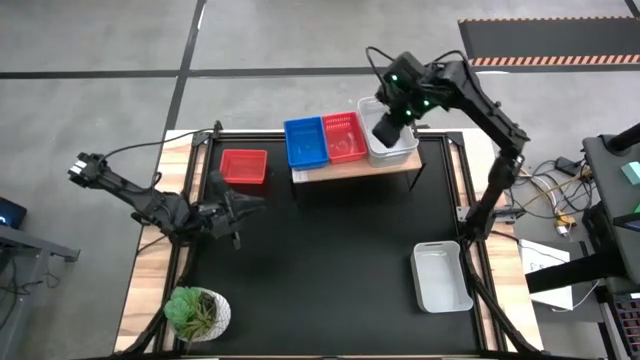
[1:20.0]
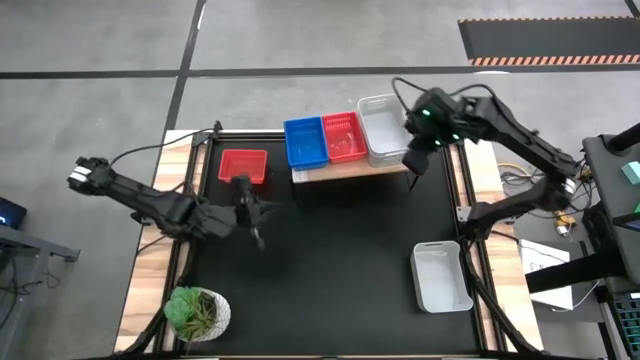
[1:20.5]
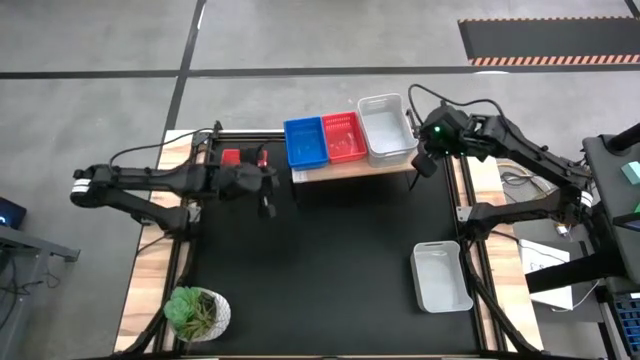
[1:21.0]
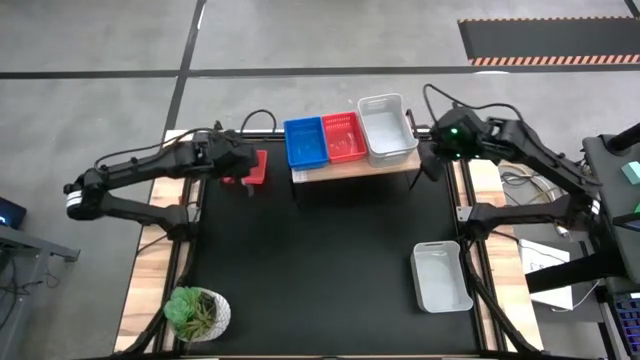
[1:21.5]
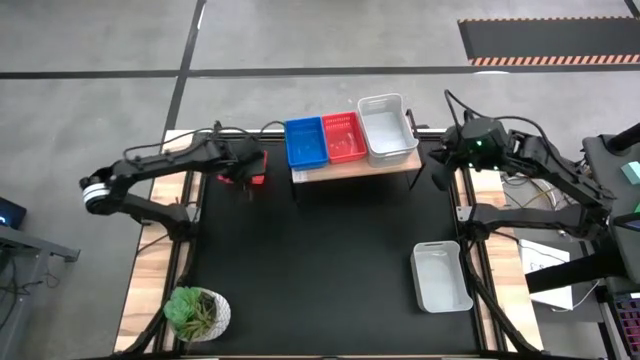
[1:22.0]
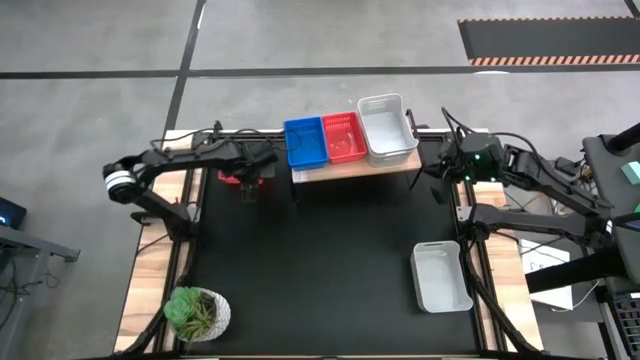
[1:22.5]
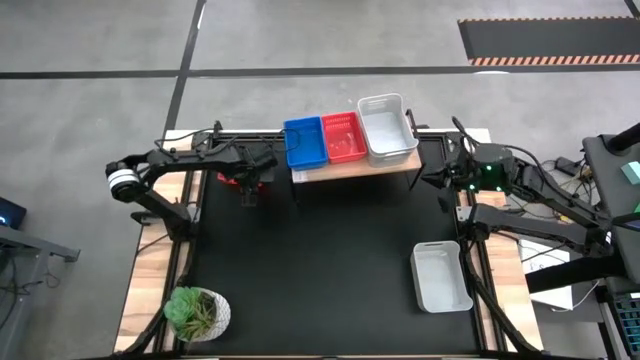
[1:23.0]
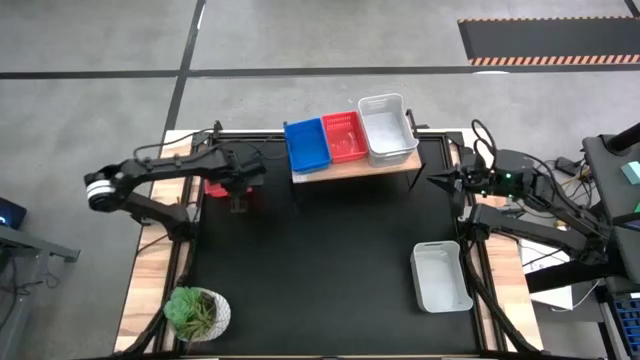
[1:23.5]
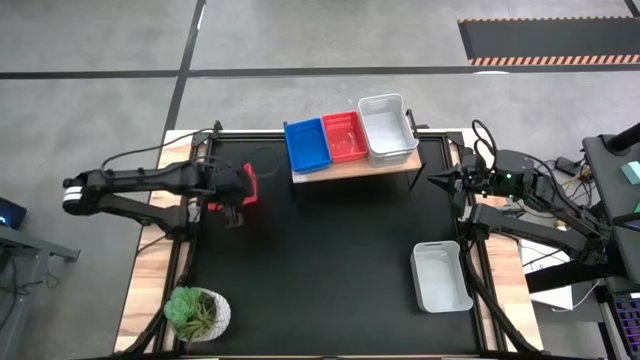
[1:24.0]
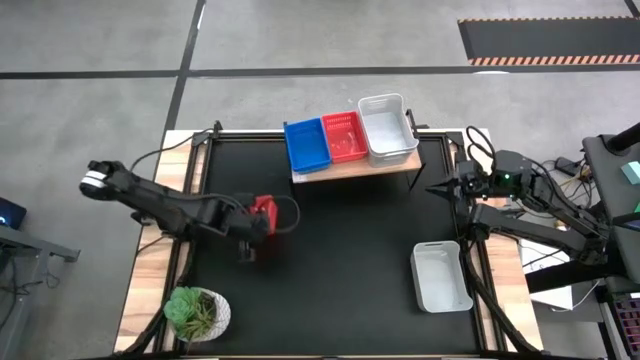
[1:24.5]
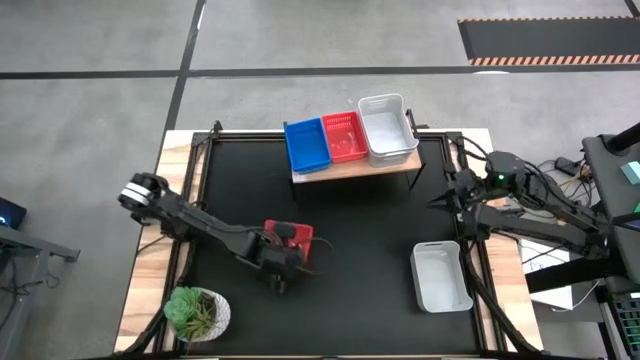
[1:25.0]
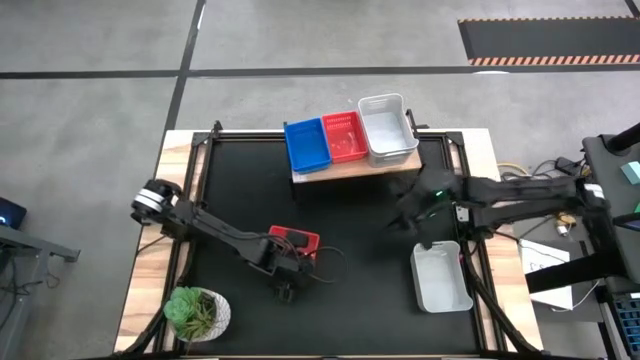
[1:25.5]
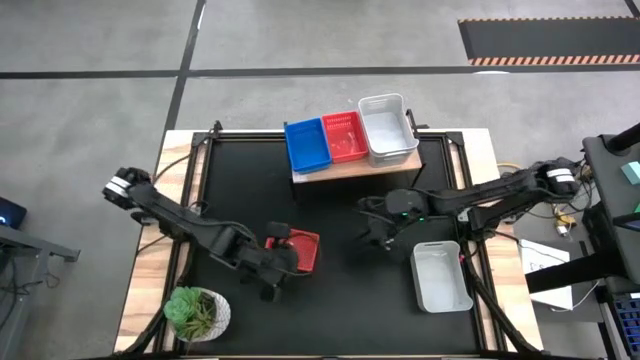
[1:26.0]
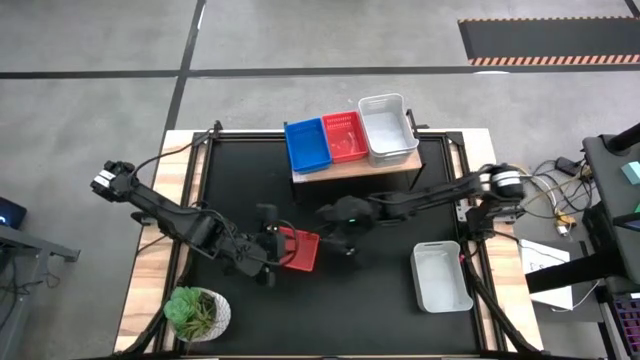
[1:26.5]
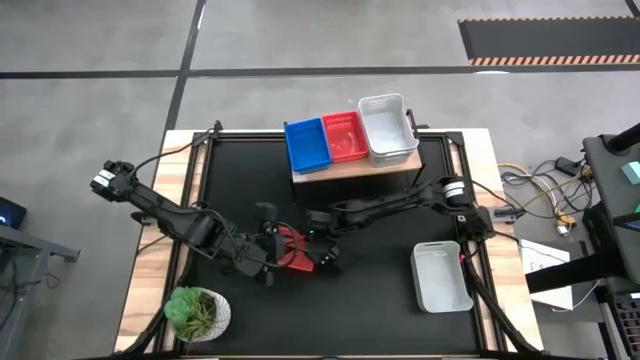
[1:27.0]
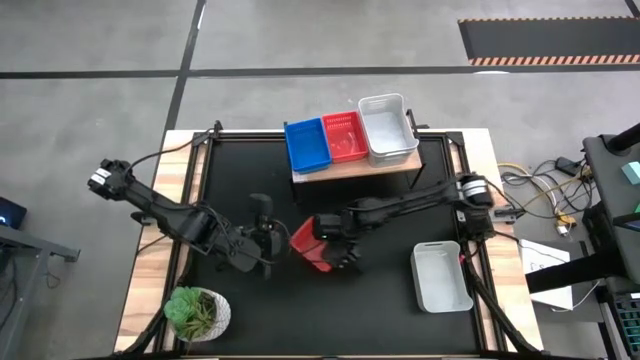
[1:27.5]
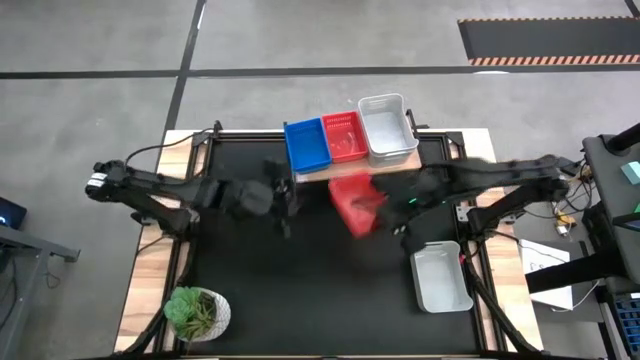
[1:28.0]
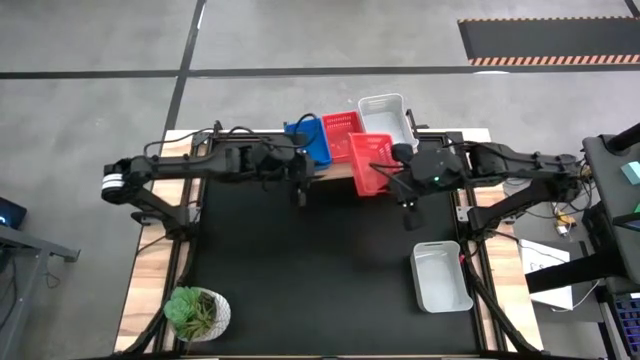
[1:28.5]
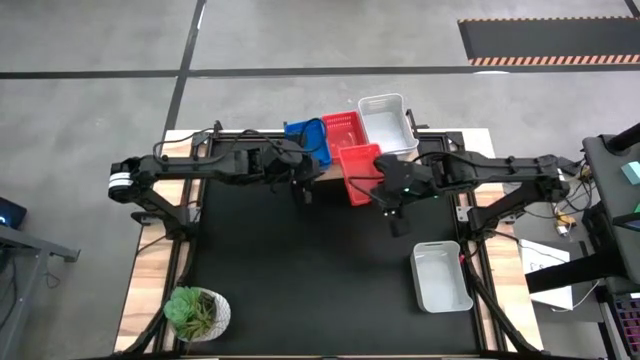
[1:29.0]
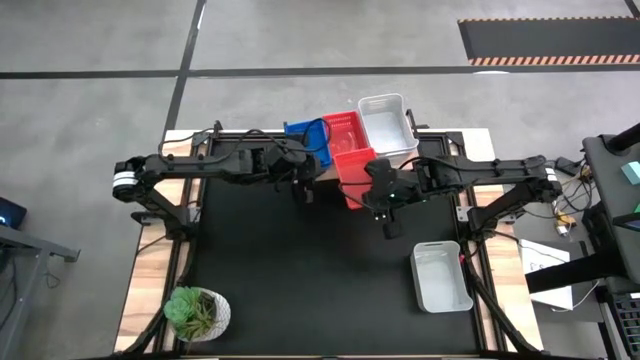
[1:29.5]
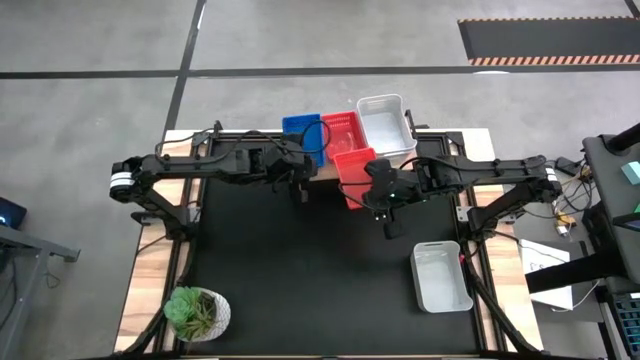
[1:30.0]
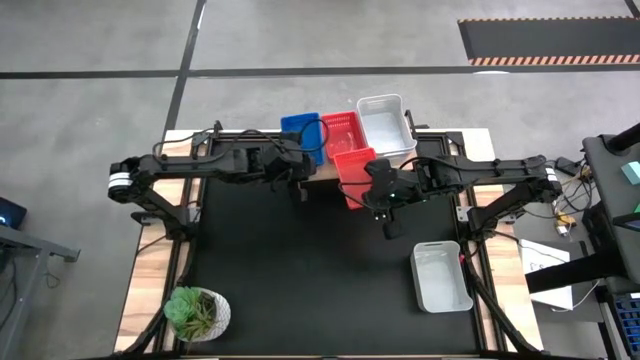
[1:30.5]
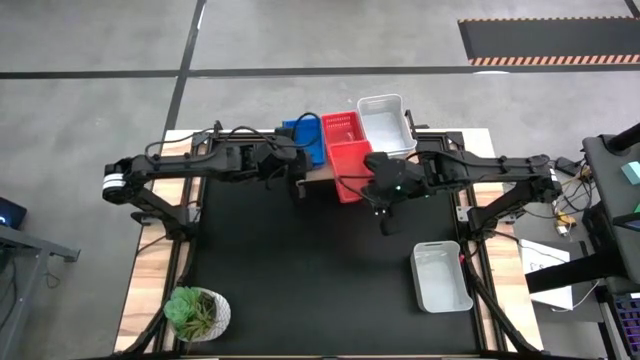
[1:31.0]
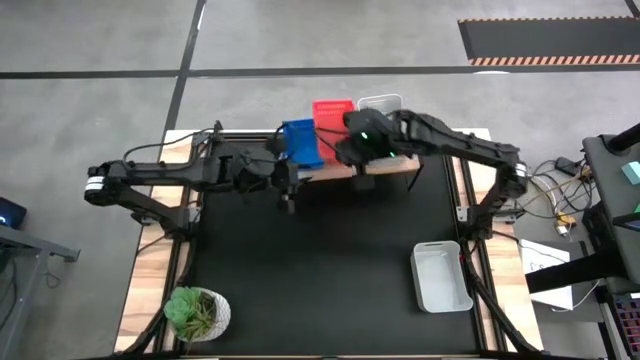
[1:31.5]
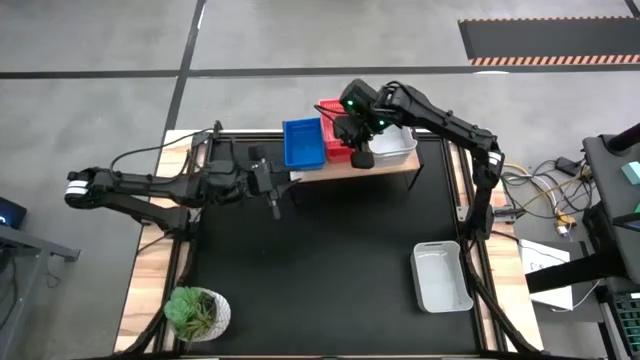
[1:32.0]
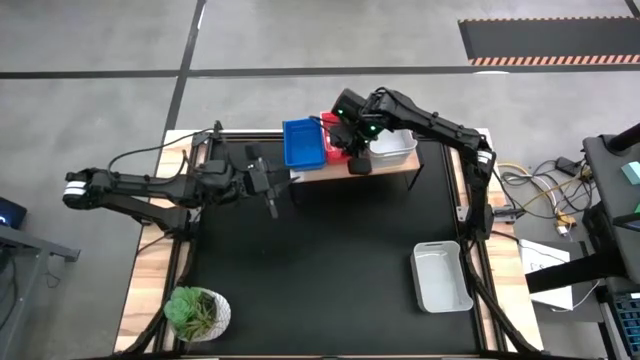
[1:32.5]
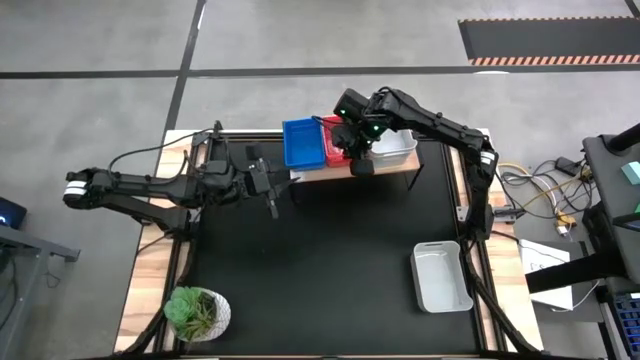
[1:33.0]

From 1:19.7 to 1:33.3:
Stack the red basket on the stacked red basket on the shelf

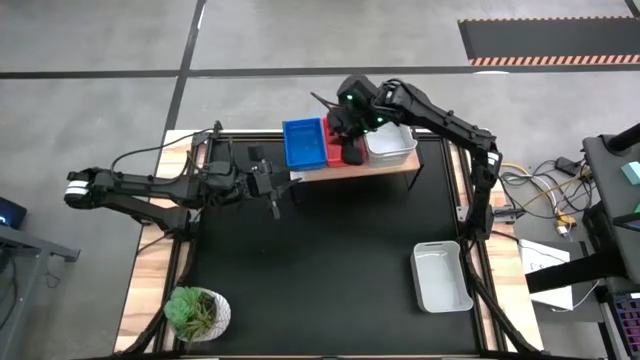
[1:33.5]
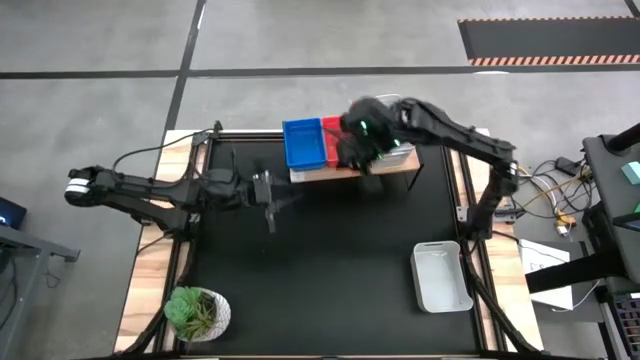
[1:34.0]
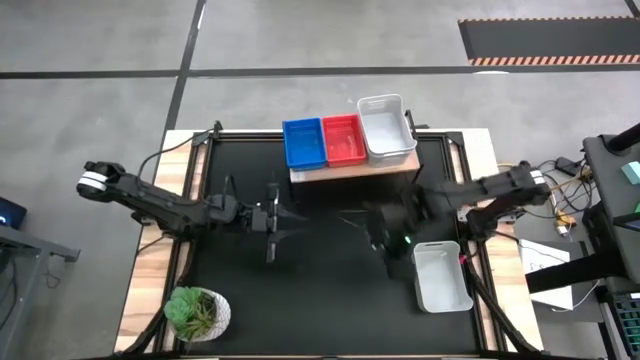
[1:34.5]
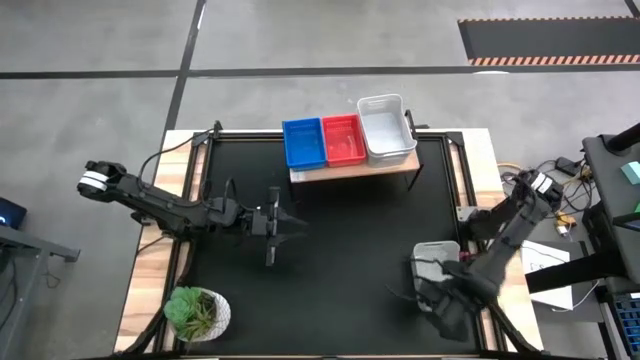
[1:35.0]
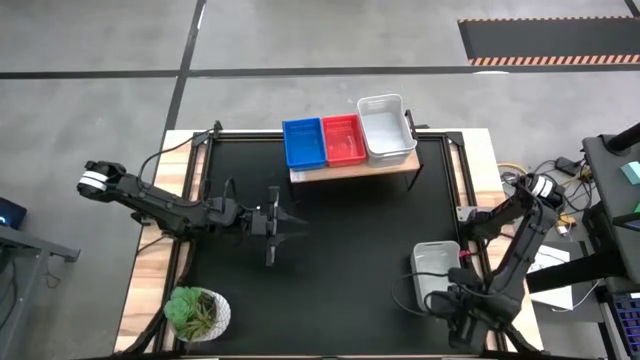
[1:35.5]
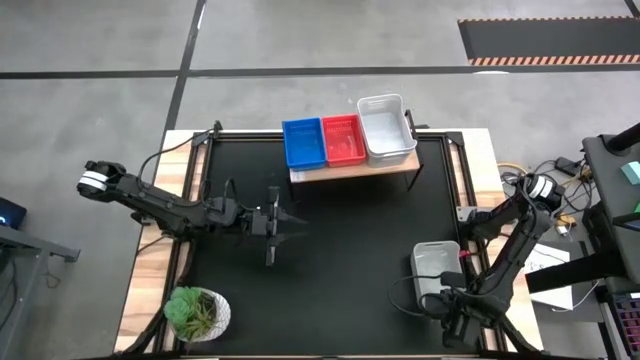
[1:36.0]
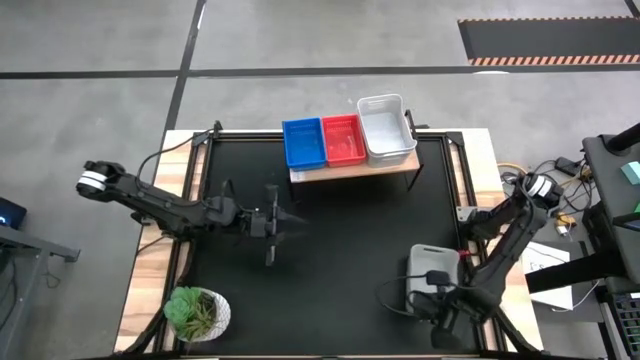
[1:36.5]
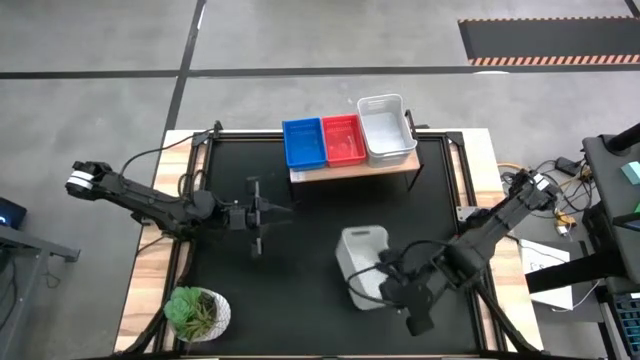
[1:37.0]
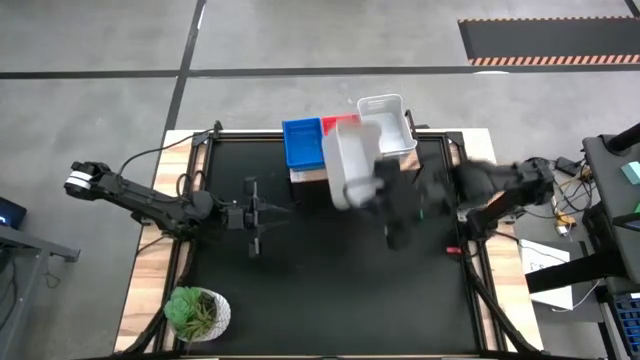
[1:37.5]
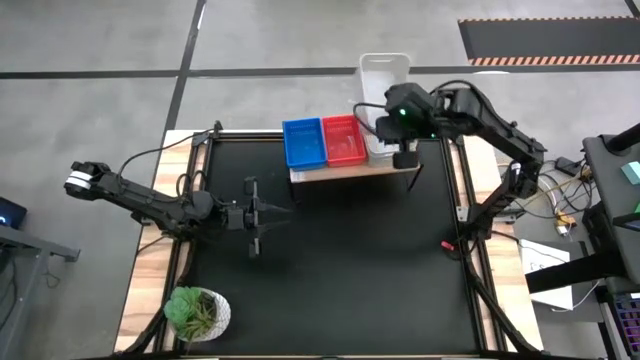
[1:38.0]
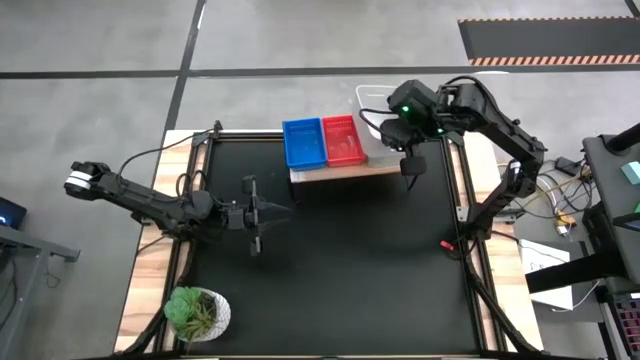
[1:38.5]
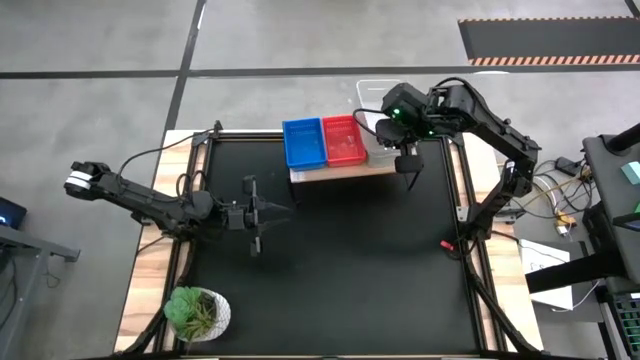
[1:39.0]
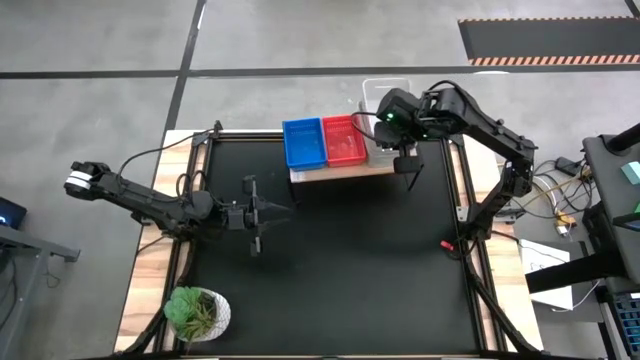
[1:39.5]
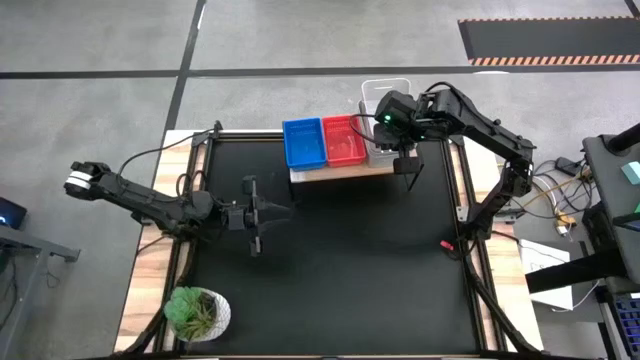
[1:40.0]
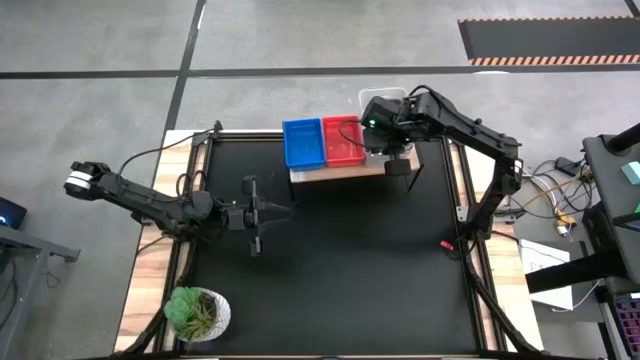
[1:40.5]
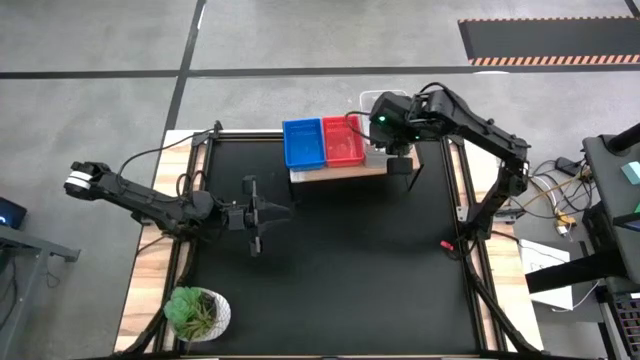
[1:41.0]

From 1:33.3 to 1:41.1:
Stack the white bin on the stacked white bin on the shelf
